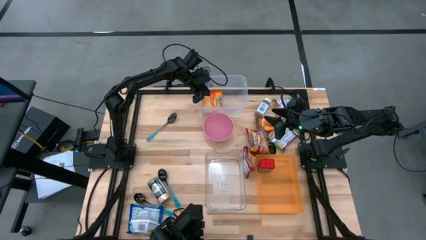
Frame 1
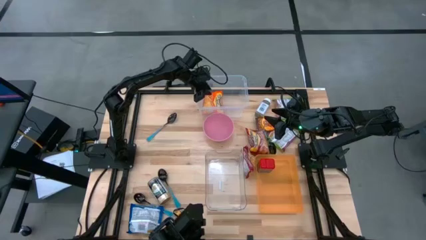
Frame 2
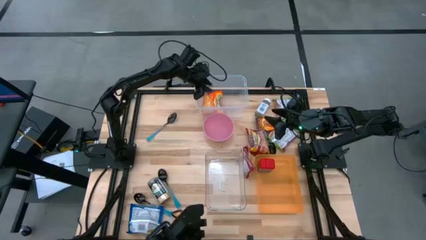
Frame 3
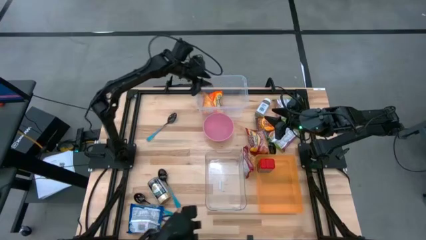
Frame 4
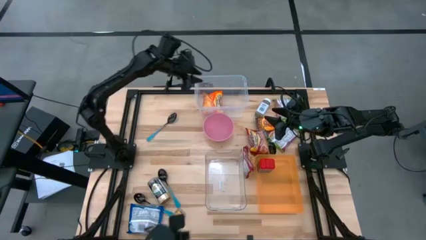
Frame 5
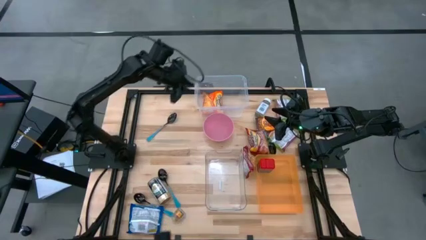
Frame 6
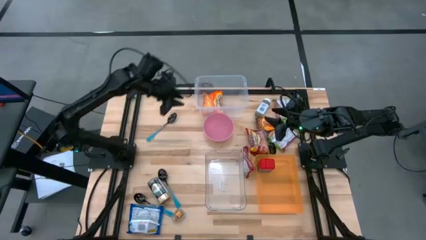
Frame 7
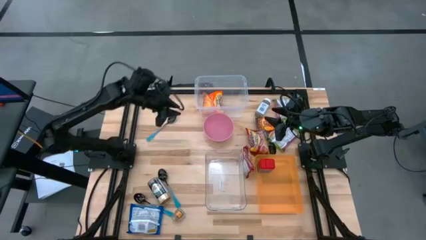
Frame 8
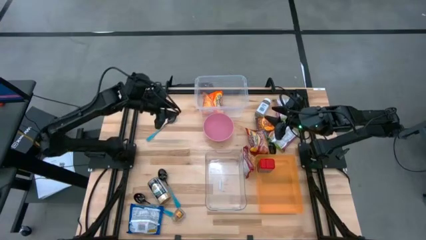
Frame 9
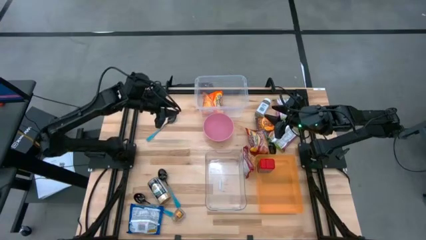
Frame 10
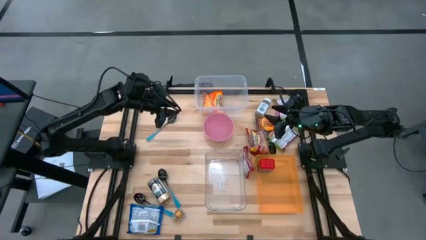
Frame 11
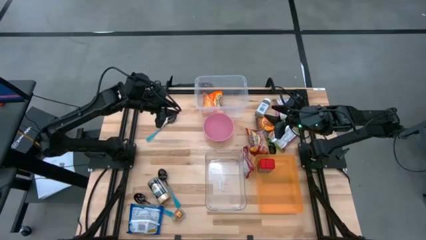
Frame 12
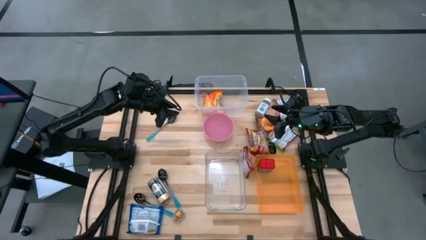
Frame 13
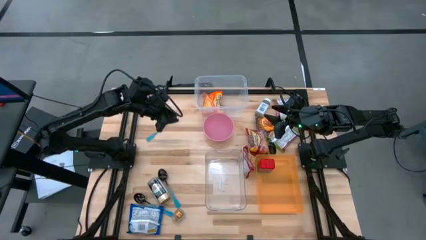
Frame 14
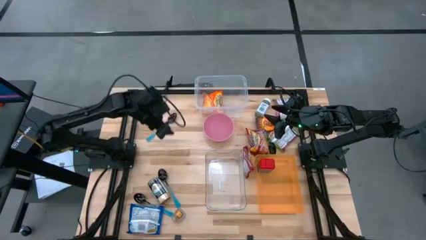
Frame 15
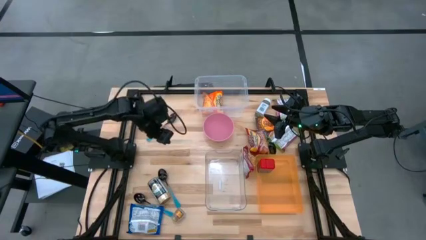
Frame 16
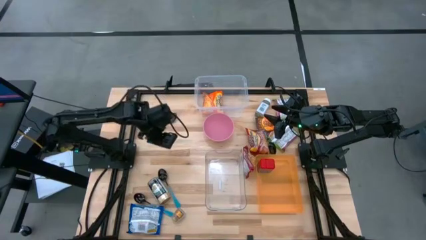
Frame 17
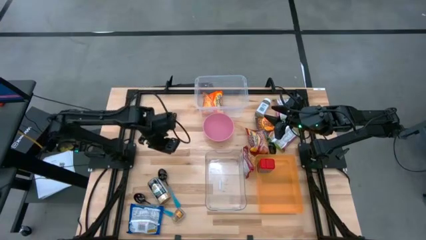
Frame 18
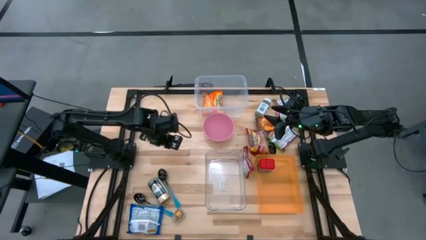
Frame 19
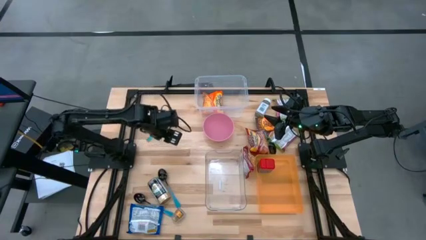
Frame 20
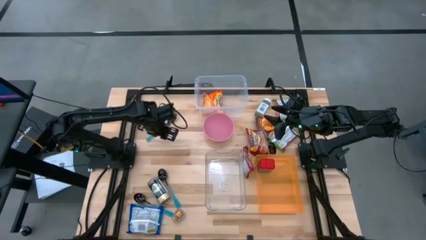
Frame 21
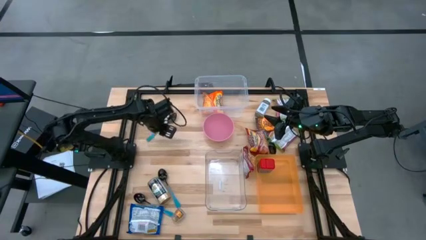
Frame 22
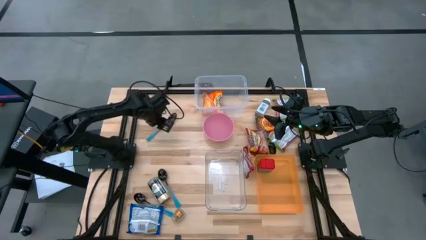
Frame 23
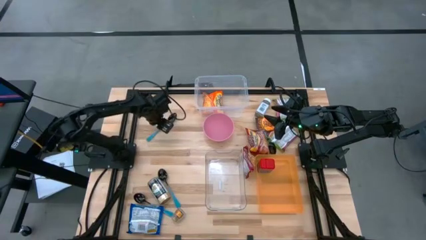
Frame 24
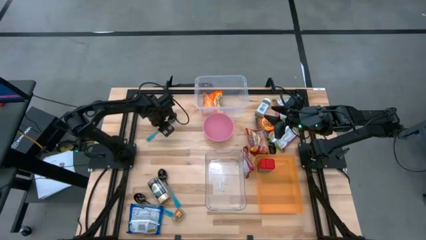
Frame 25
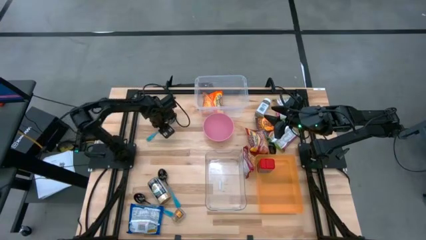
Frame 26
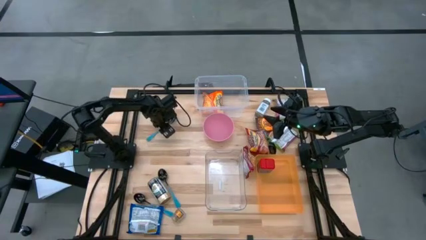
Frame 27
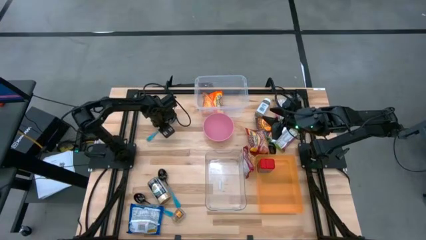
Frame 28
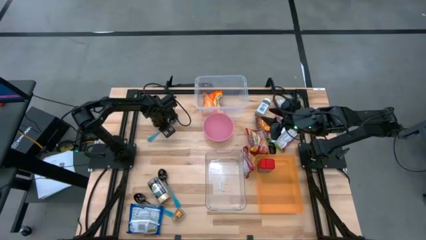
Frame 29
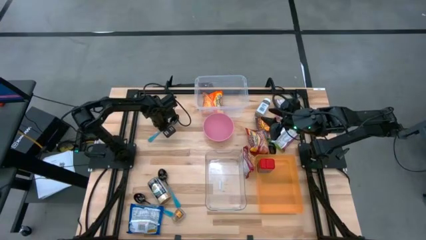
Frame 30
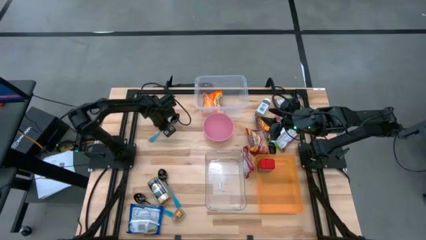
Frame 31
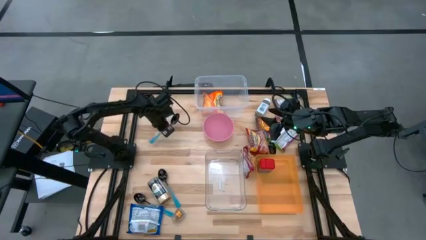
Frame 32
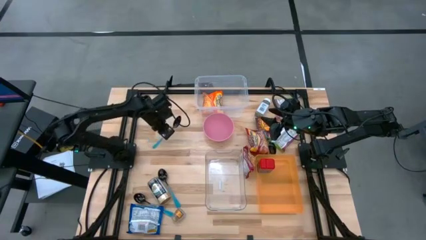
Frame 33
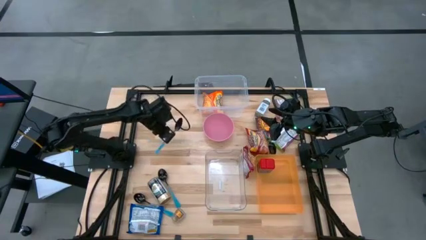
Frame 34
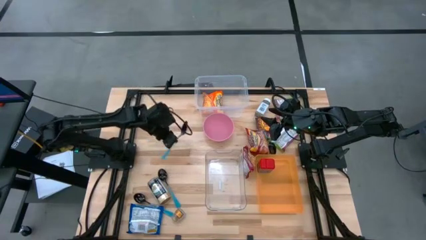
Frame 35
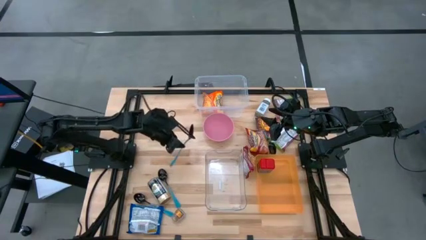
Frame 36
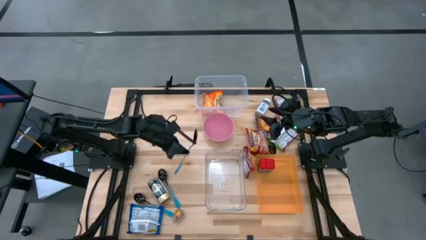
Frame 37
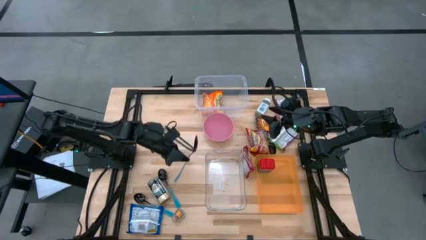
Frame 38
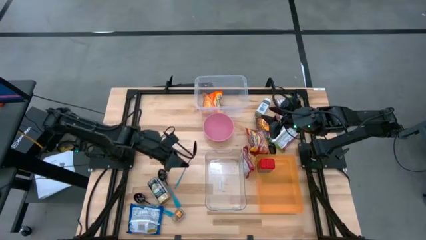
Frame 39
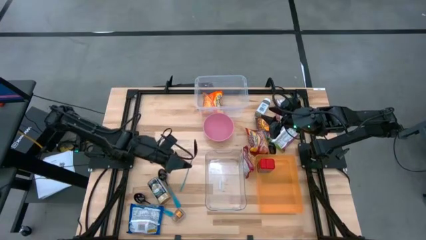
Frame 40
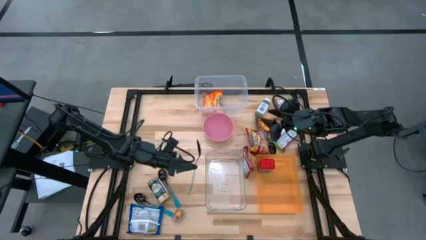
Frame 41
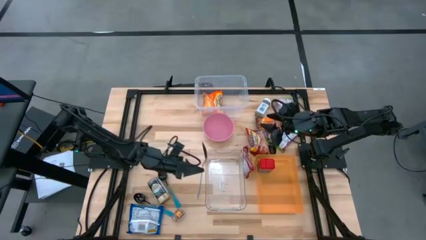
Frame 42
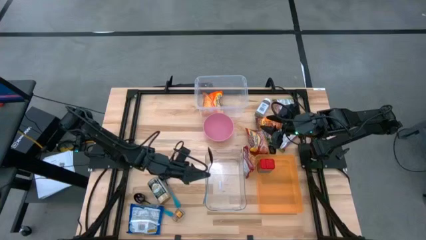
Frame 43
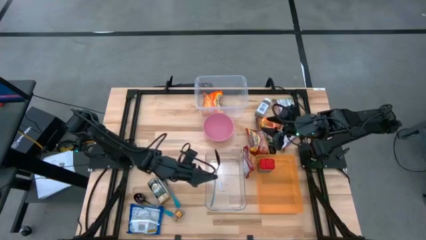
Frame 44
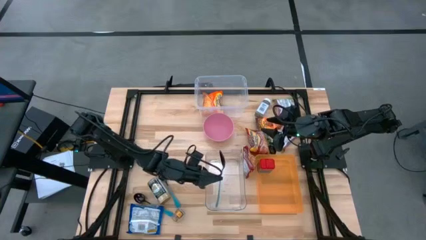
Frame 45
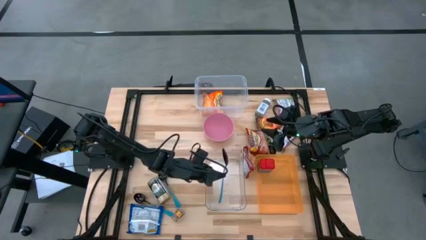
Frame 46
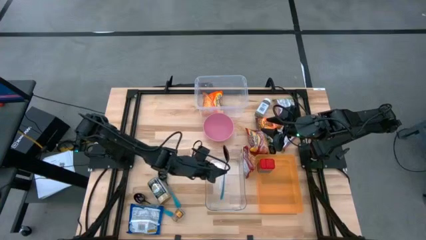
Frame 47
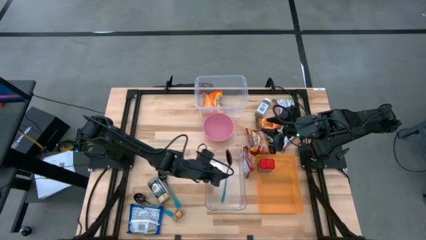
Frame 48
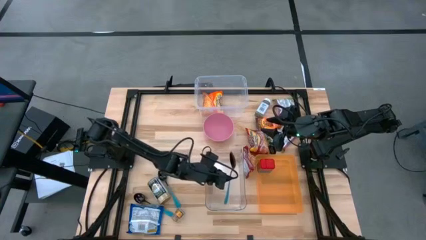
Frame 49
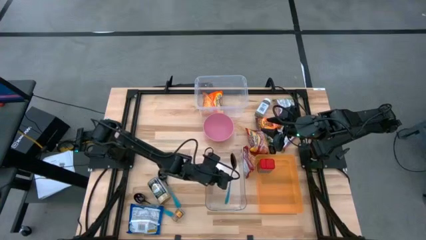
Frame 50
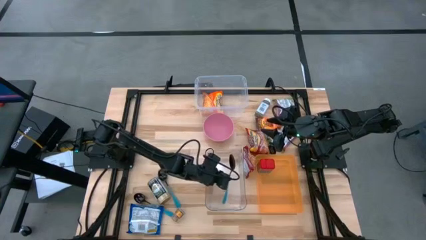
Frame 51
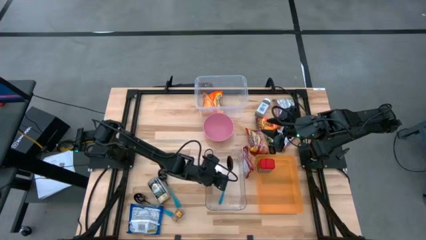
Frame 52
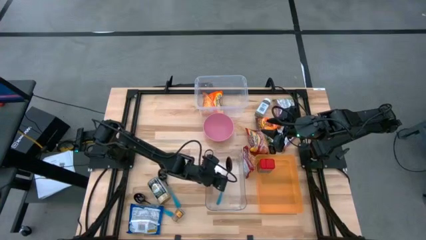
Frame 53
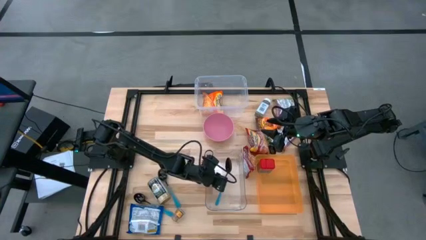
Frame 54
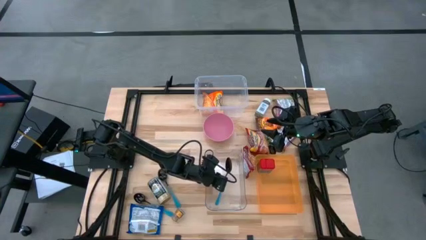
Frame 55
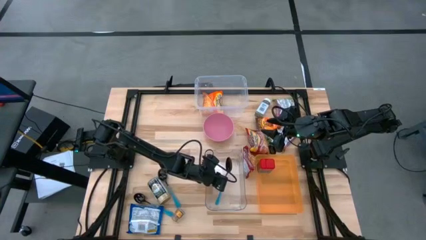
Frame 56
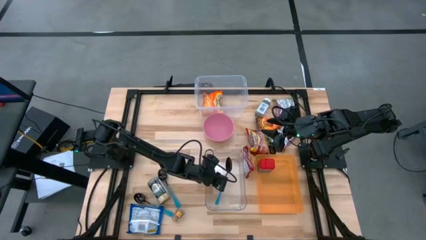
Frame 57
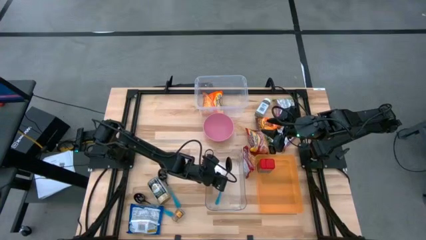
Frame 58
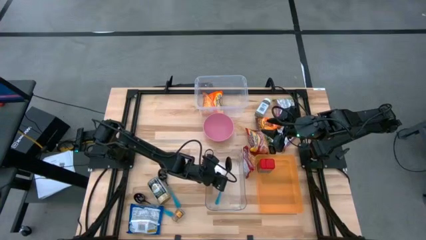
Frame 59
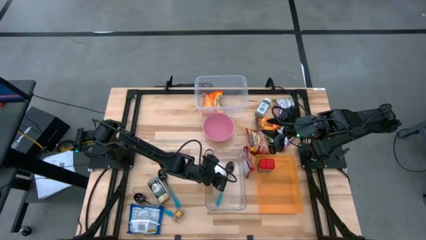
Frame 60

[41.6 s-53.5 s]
Task: Pick & Place Food Item
Put the blue spoon into the bottom transparent bin

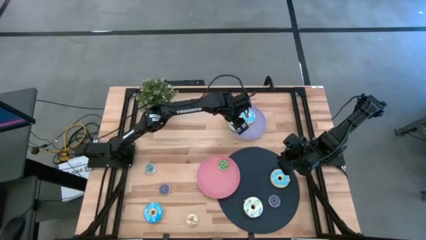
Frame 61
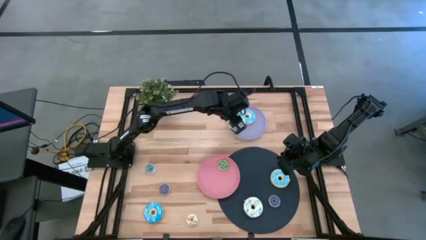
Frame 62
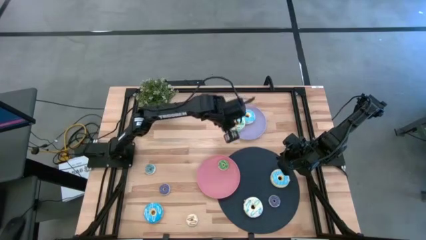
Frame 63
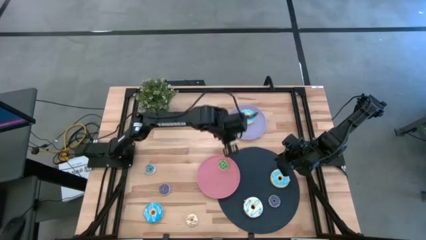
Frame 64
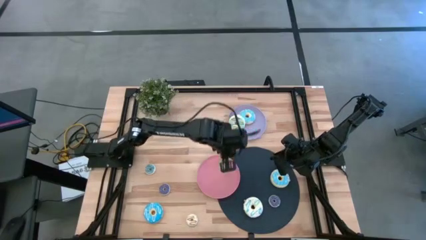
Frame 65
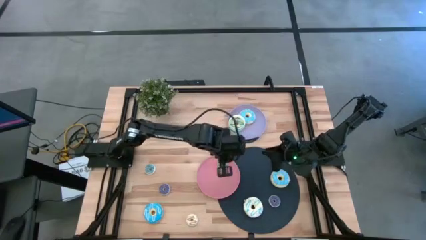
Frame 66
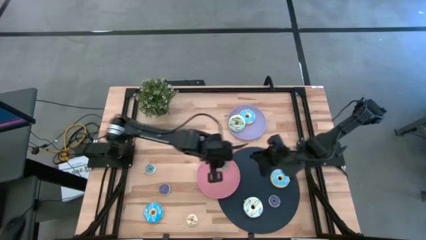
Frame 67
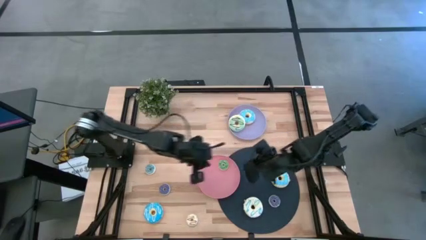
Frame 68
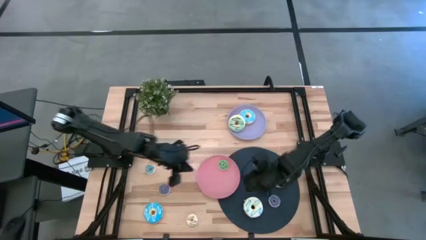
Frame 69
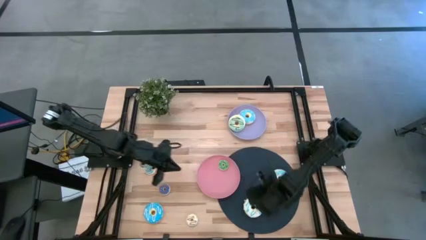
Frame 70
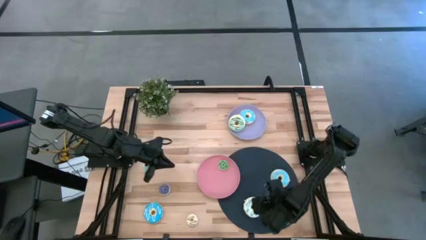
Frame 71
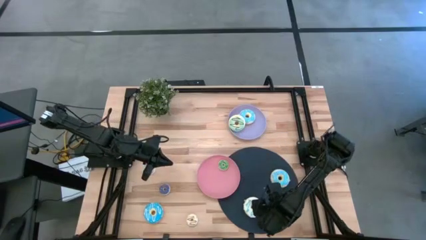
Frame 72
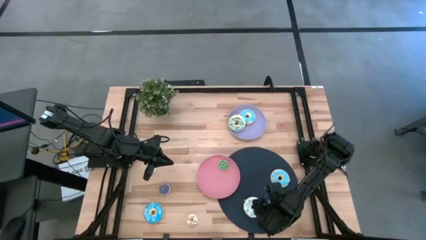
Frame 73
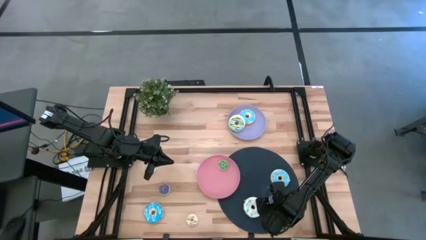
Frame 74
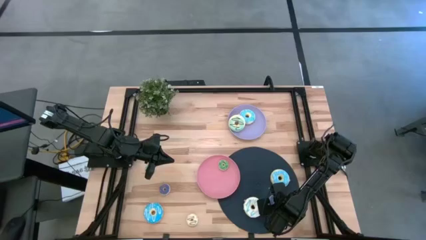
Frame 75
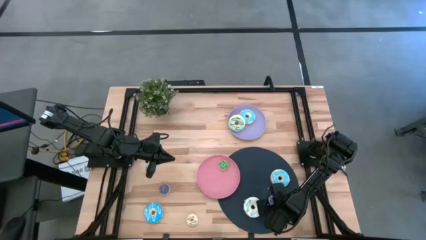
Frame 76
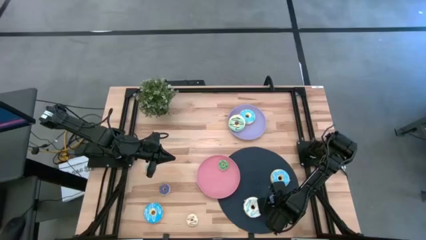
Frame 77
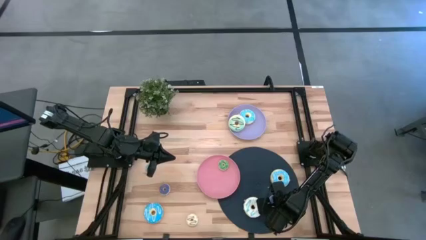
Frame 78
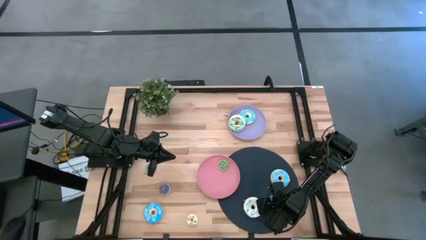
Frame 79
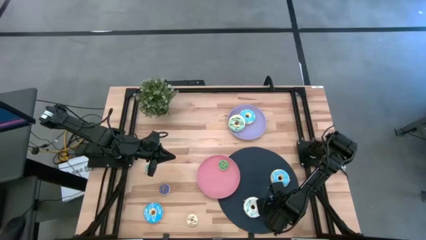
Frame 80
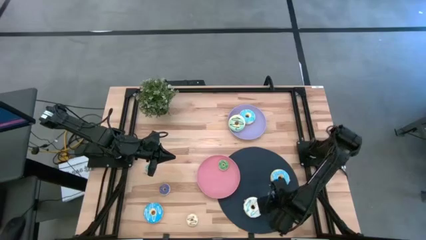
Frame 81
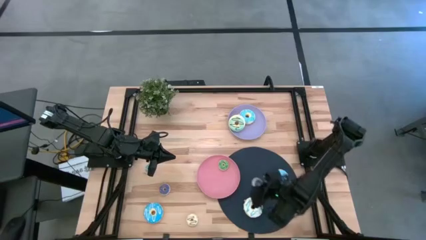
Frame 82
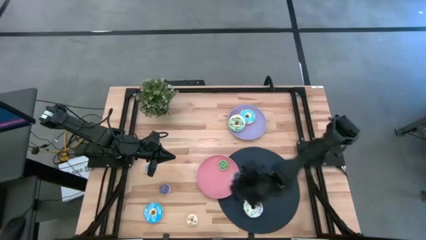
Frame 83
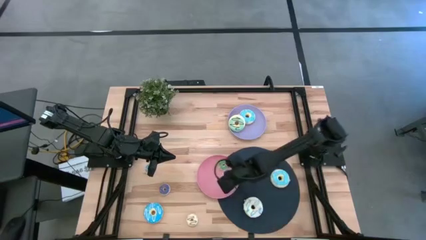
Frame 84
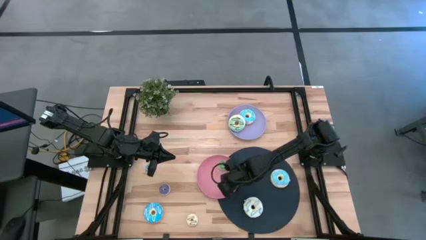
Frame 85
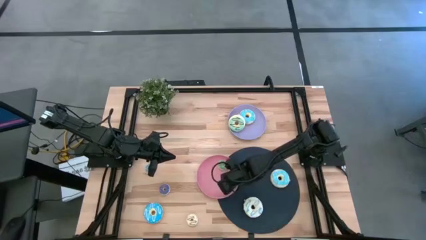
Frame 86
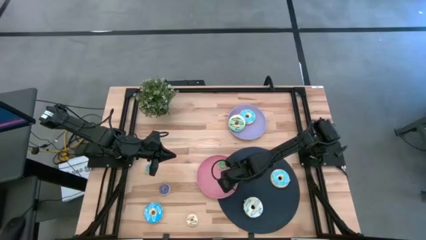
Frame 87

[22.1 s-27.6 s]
Task: Pick & Place donuts
Put the right small purple donut on the pink plate
